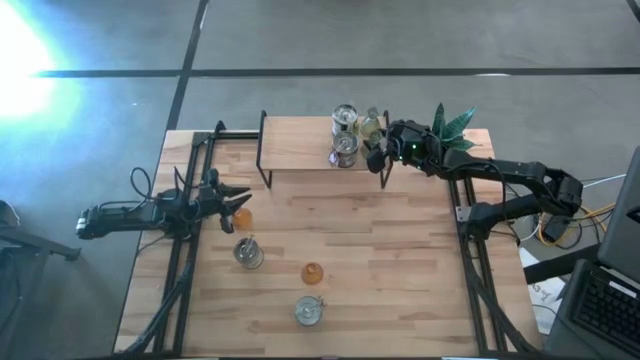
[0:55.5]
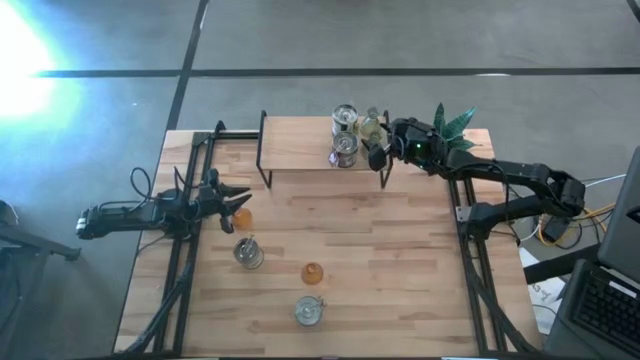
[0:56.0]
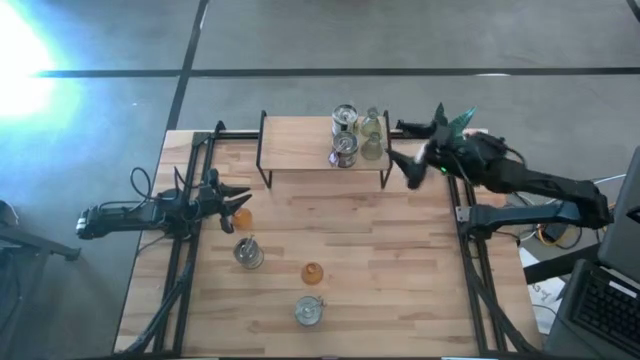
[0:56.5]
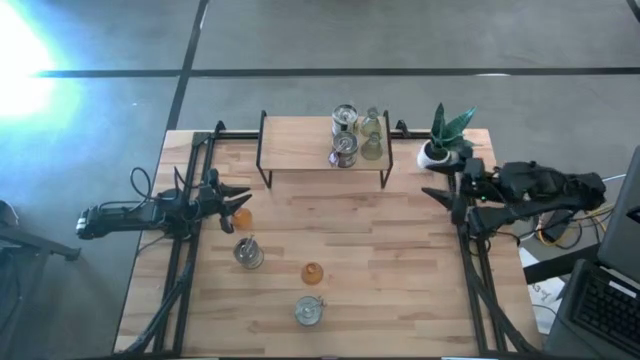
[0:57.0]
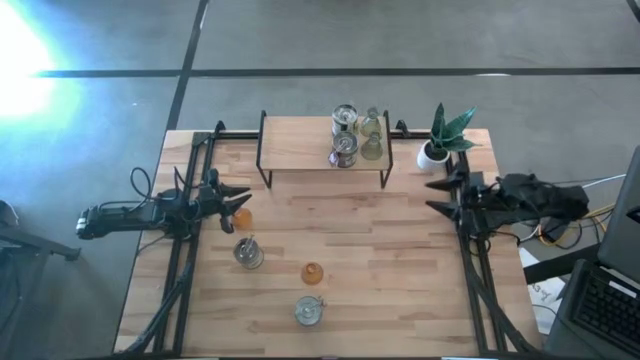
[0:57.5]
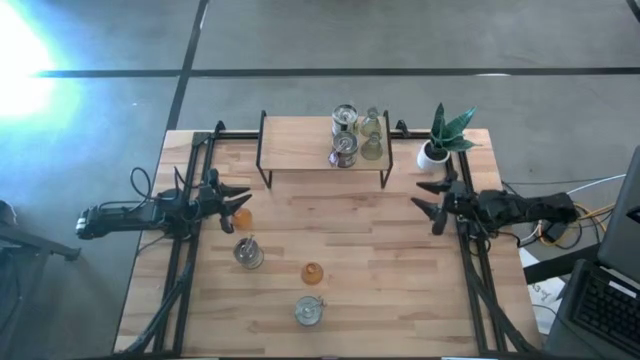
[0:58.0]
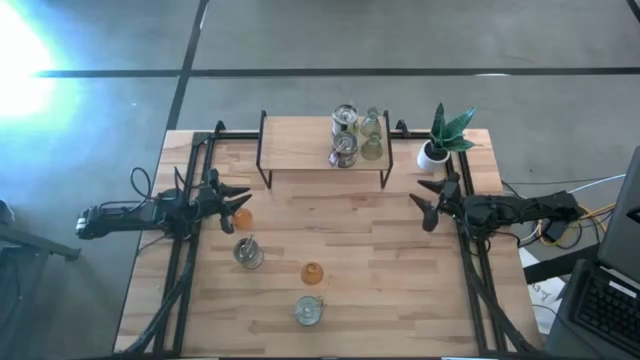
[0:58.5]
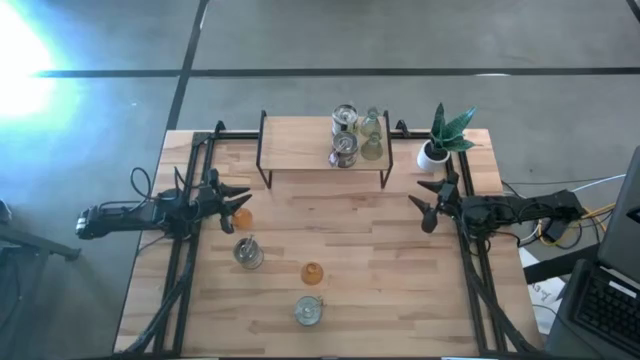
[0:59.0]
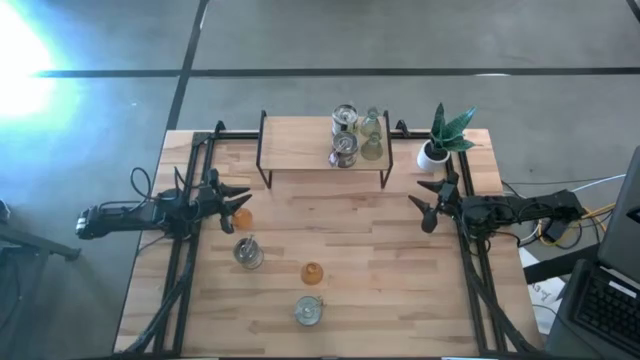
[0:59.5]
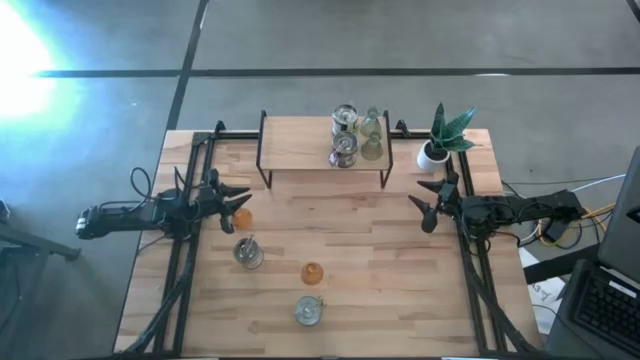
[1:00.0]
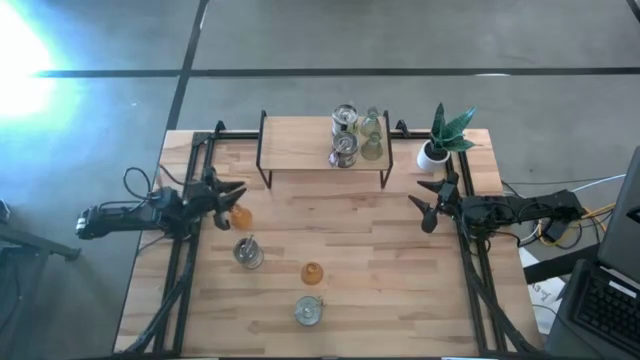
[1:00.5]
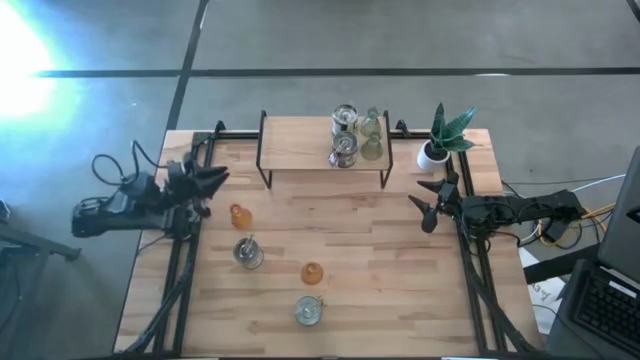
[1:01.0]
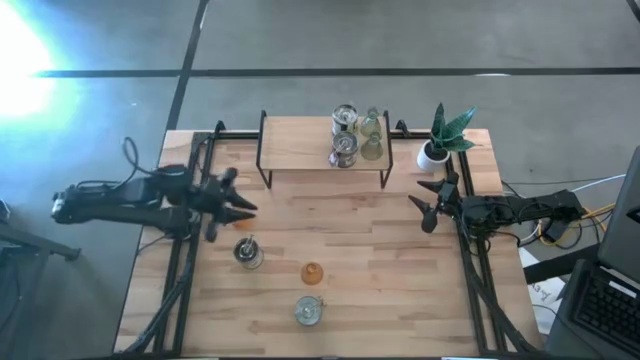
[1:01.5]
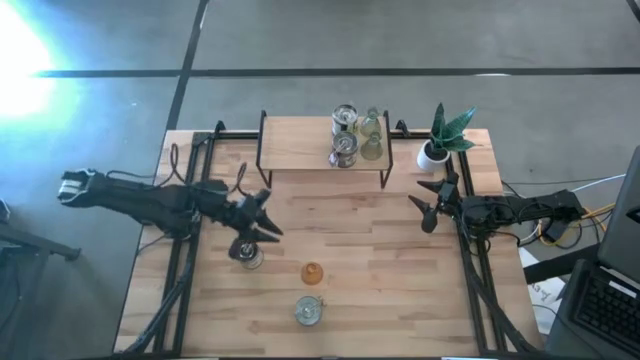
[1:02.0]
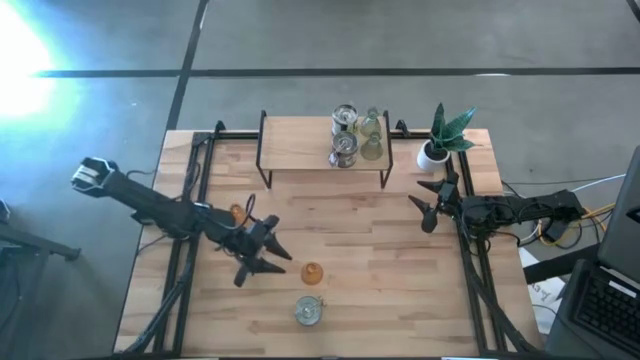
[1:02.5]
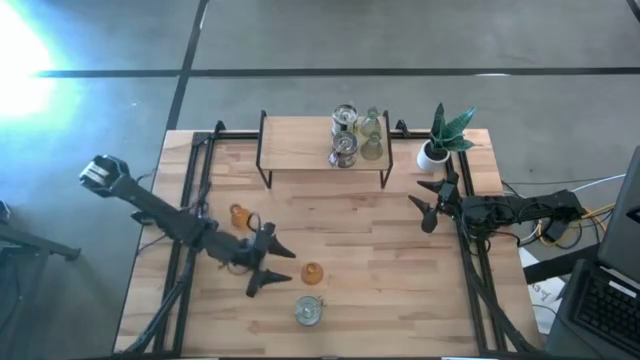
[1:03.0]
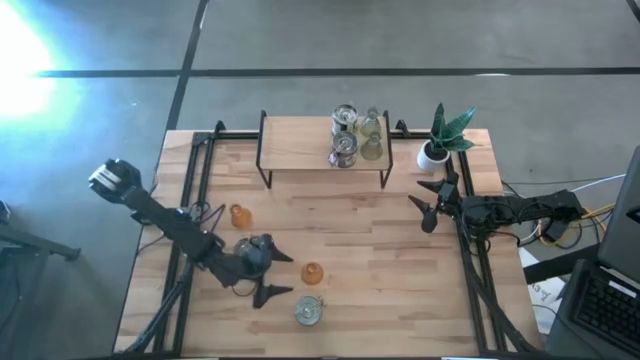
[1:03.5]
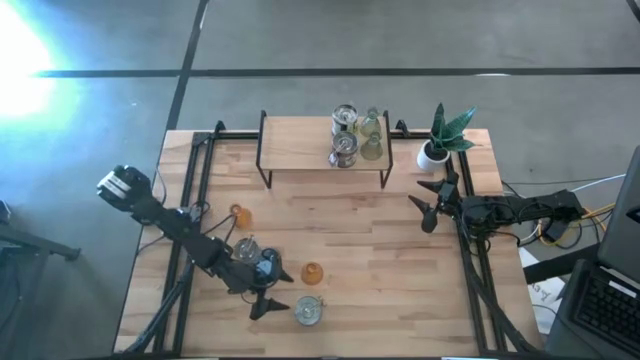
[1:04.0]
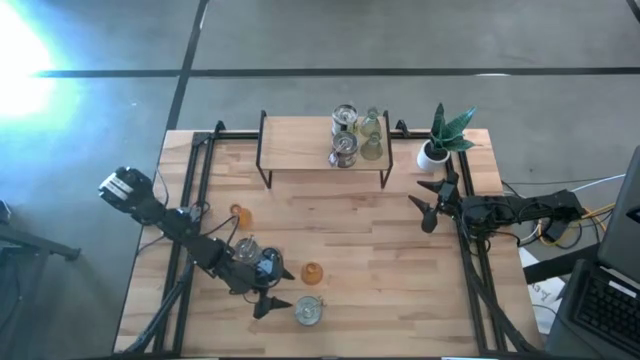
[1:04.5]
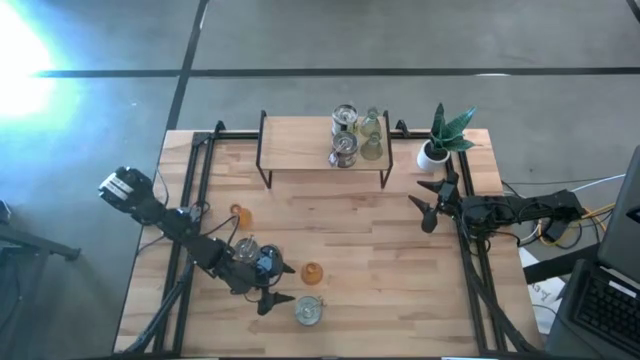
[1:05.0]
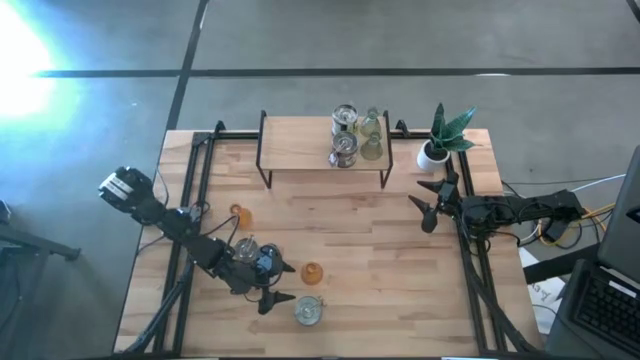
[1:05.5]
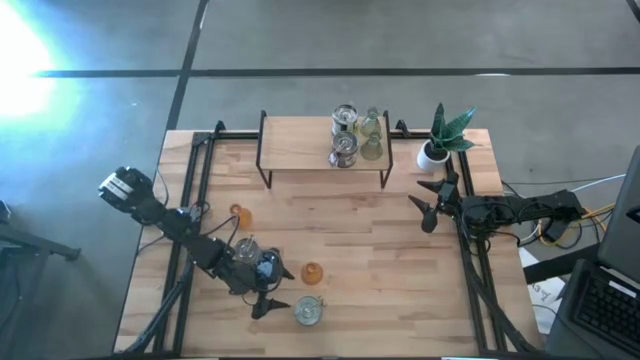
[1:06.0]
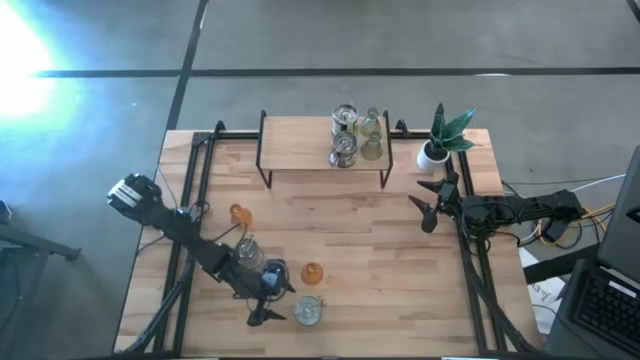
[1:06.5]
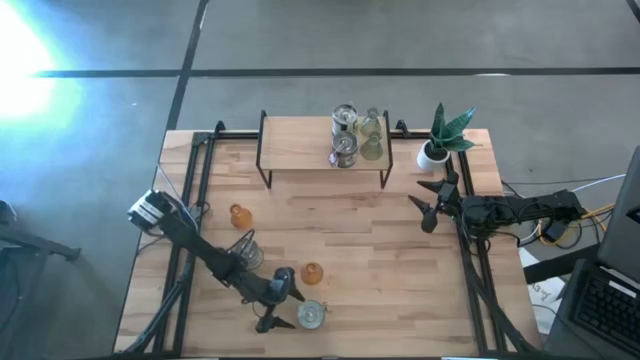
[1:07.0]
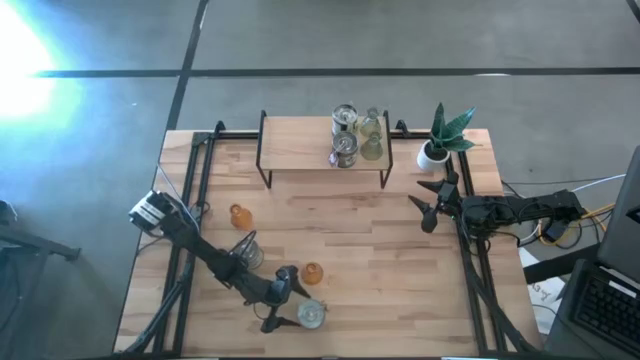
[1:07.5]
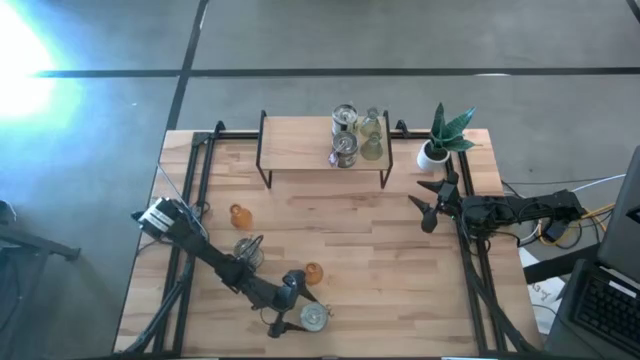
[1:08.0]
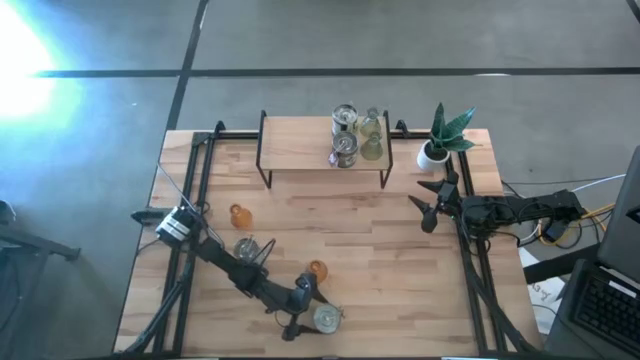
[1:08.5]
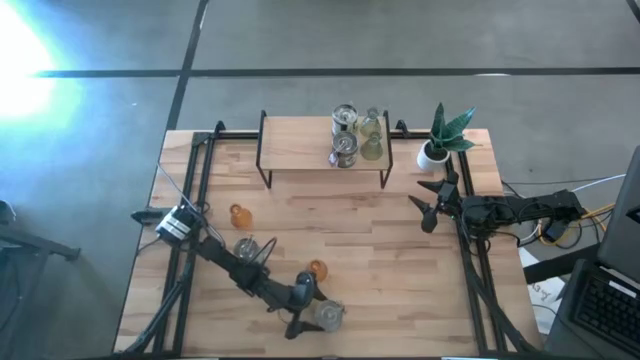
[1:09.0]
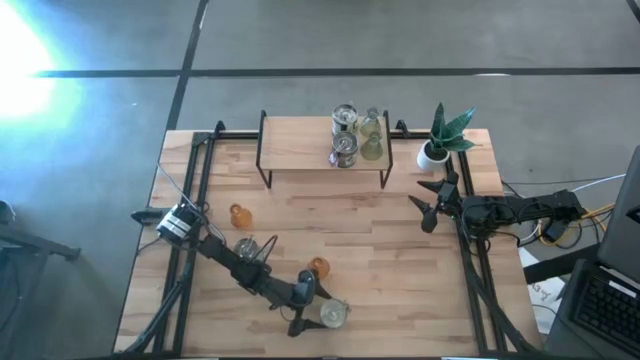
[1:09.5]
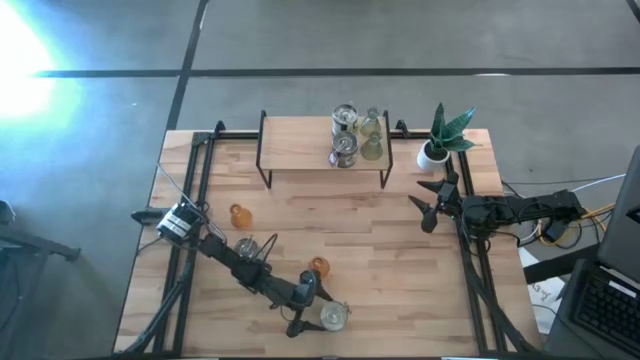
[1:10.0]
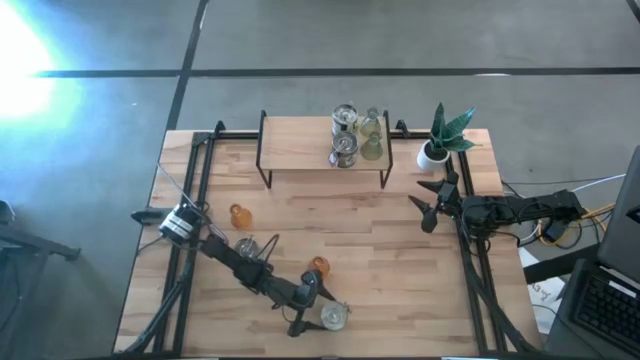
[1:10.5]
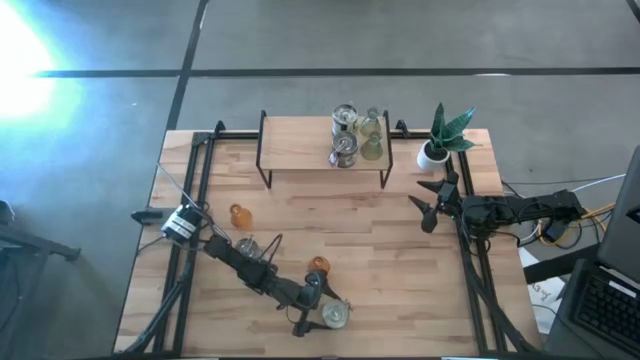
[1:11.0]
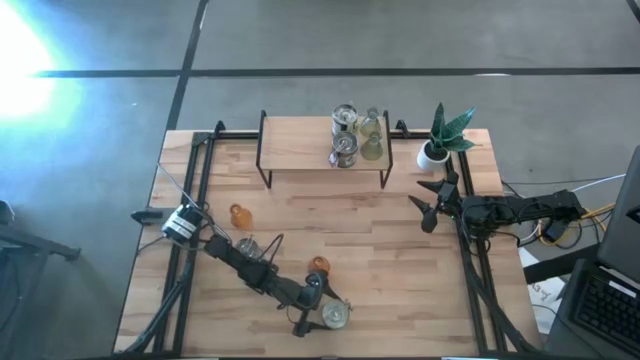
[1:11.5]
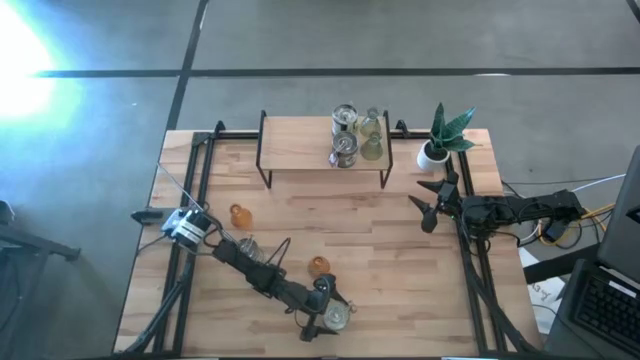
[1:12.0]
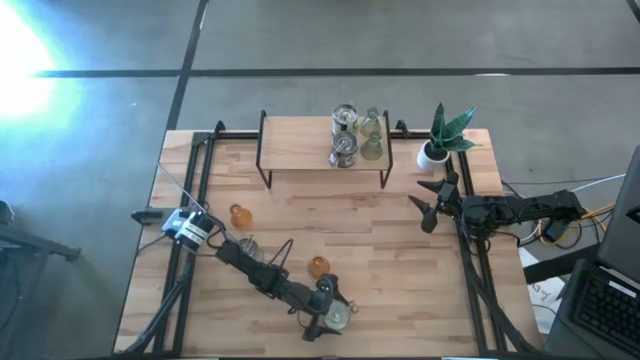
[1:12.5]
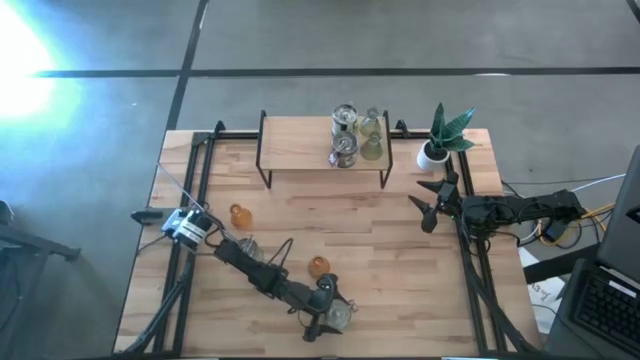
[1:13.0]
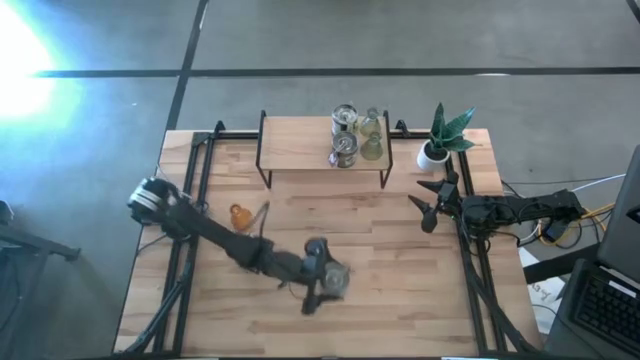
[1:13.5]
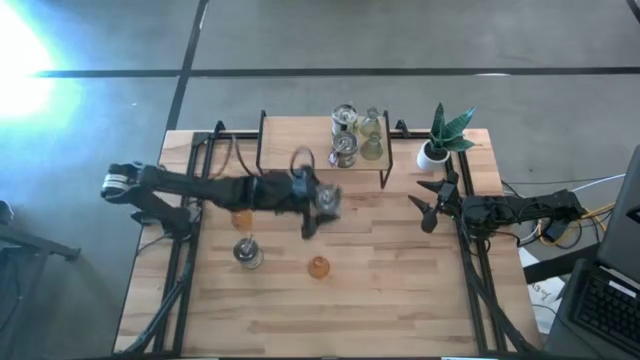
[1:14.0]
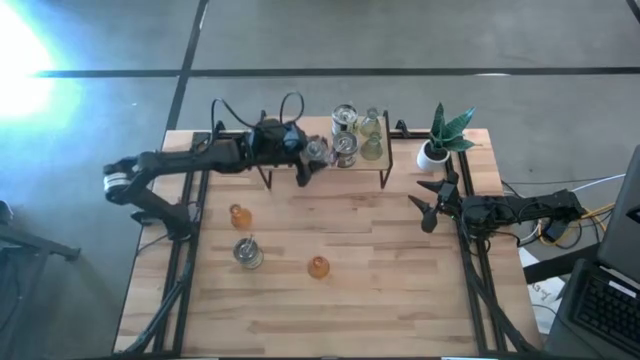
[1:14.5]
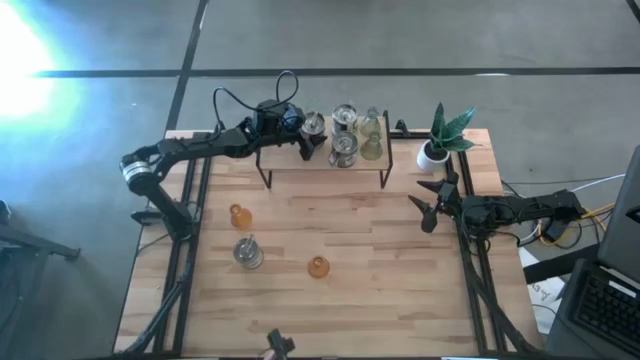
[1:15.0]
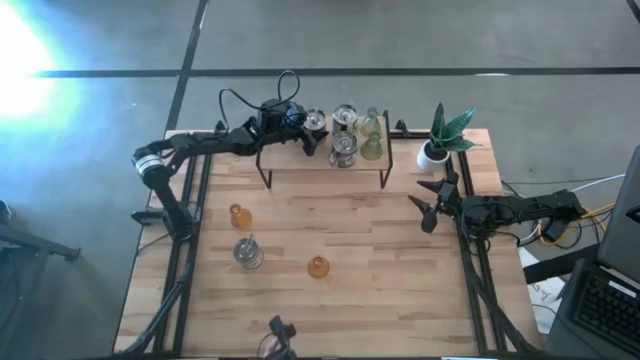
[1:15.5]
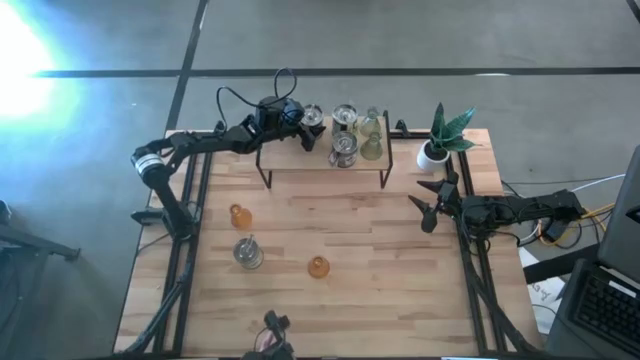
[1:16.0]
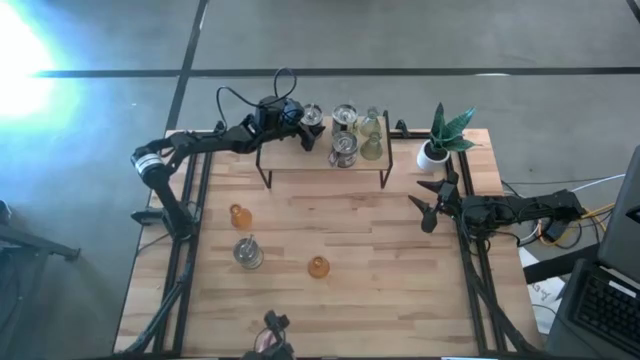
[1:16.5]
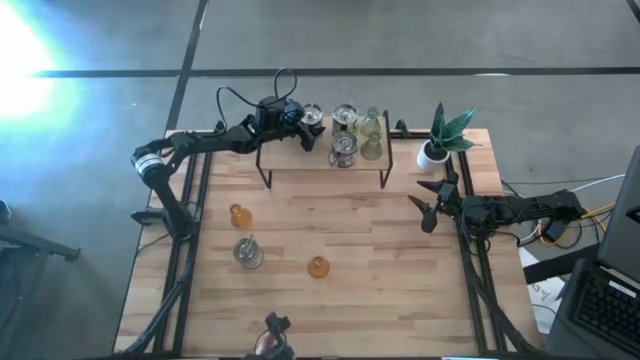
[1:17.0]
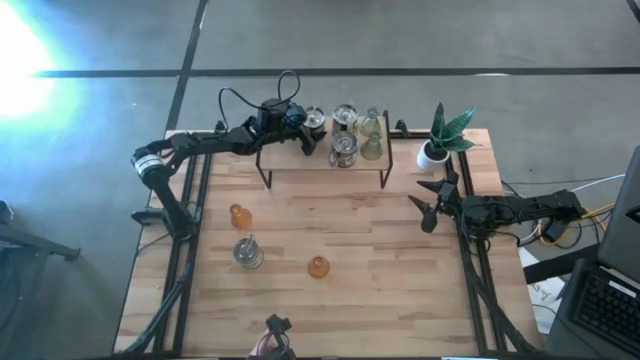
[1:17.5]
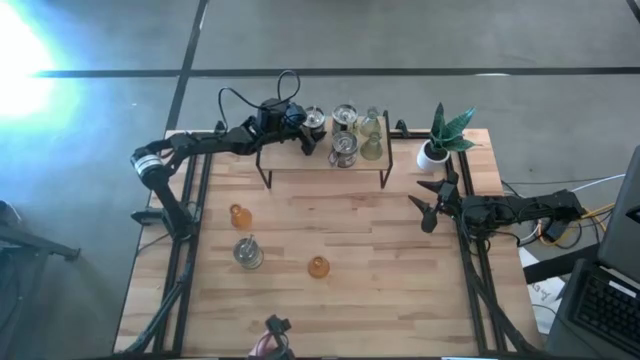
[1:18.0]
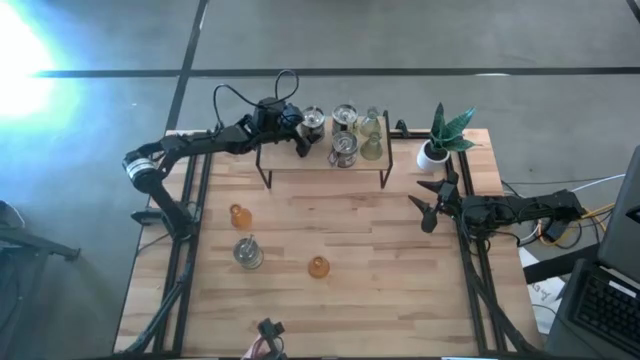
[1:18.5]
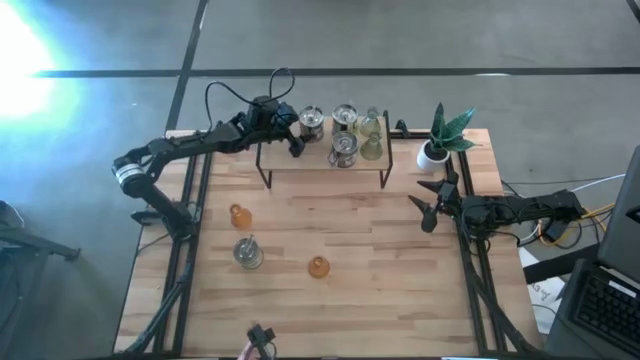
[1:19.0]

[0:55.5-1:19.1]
Task: Pick & Place candle stick holders
Put the brown scented candle on the shelf
